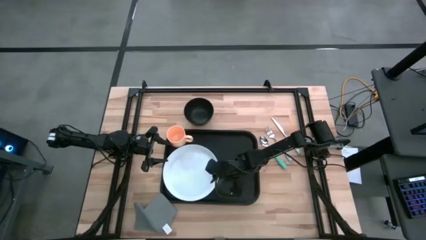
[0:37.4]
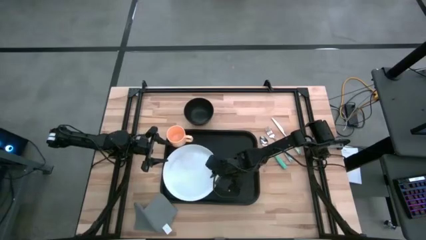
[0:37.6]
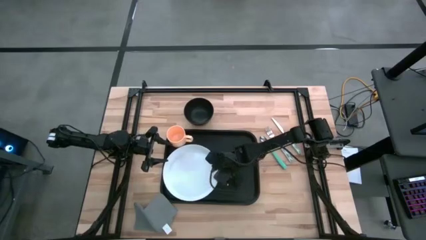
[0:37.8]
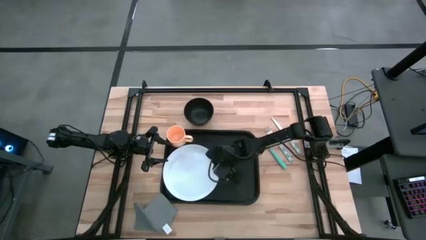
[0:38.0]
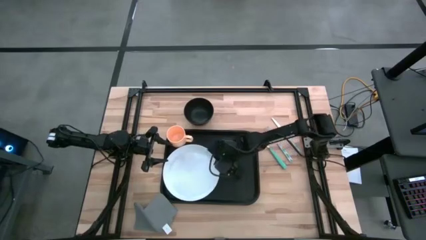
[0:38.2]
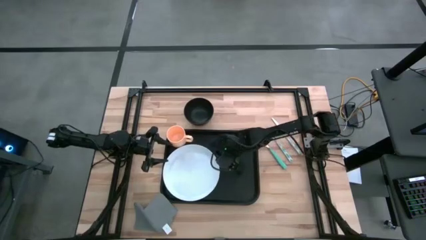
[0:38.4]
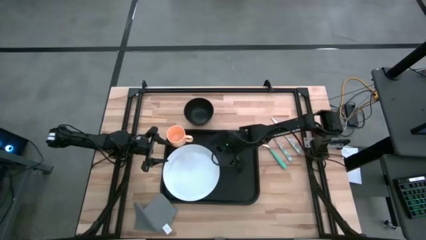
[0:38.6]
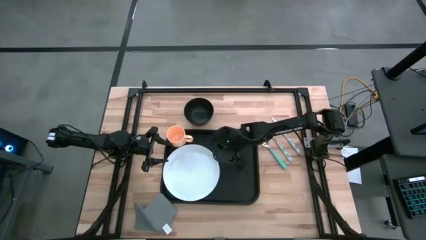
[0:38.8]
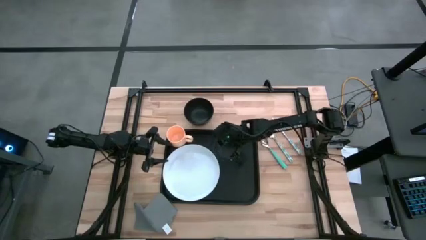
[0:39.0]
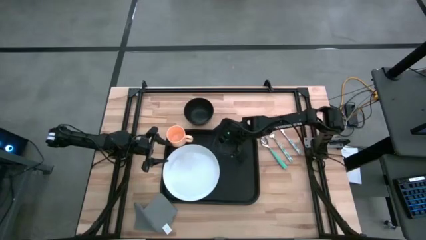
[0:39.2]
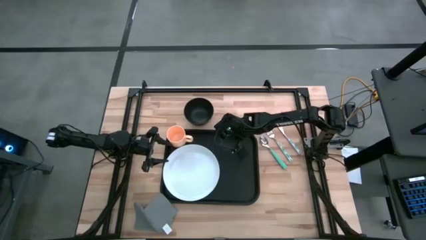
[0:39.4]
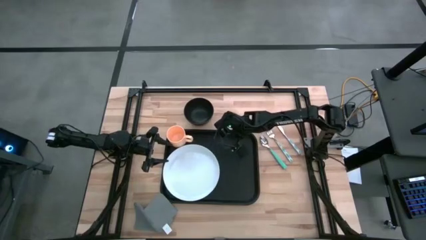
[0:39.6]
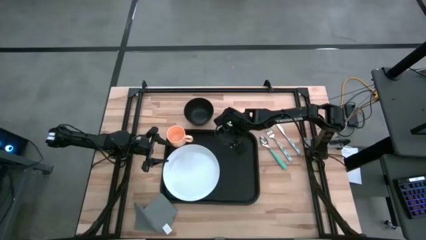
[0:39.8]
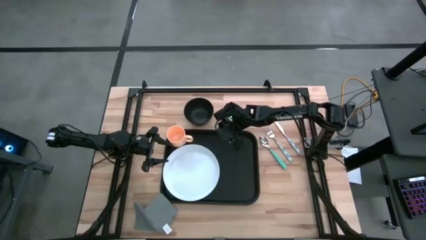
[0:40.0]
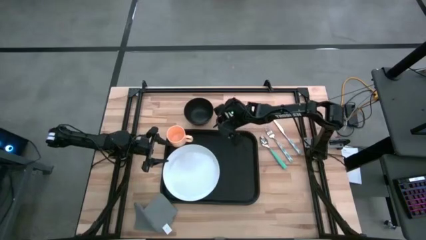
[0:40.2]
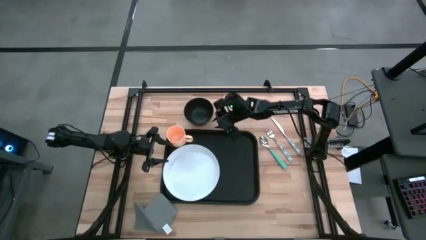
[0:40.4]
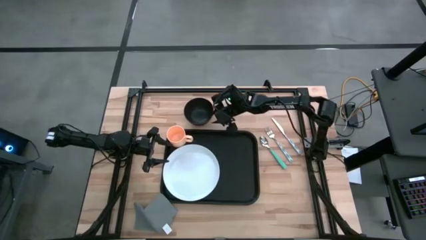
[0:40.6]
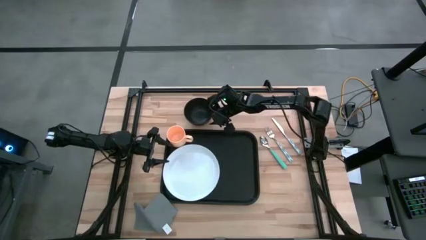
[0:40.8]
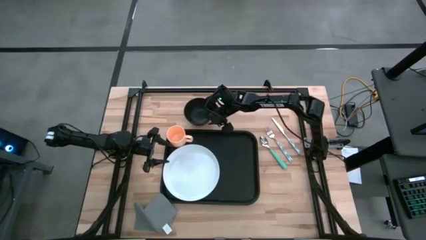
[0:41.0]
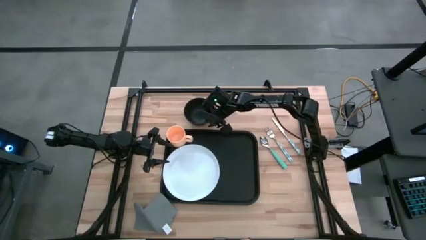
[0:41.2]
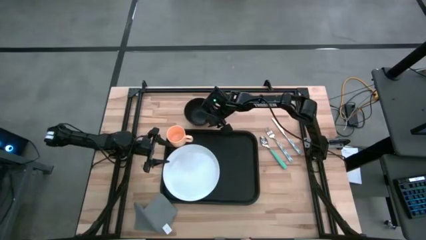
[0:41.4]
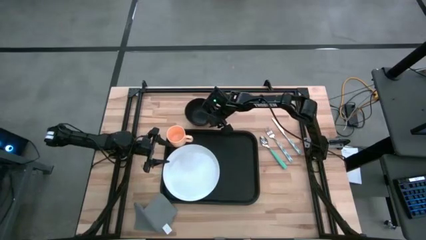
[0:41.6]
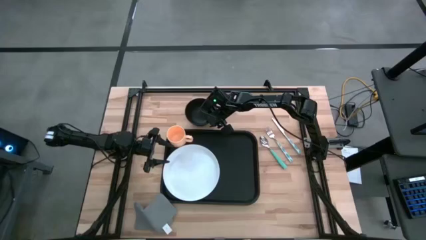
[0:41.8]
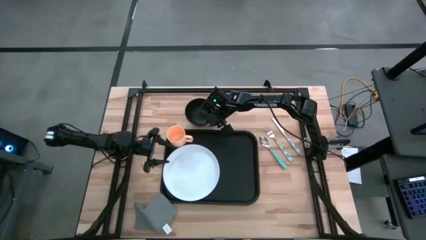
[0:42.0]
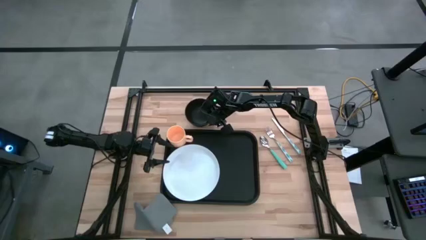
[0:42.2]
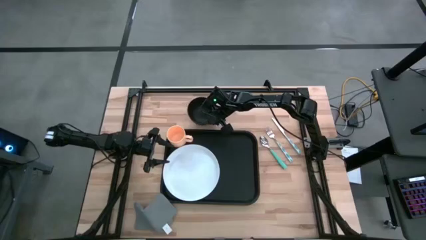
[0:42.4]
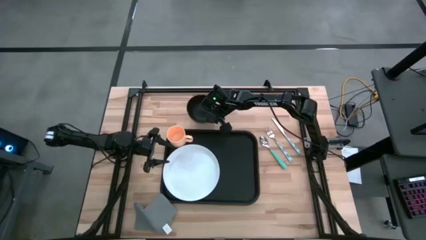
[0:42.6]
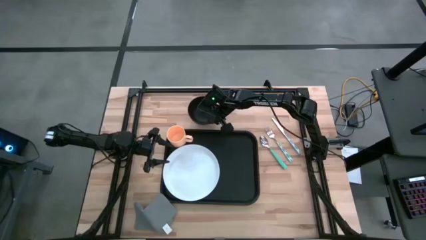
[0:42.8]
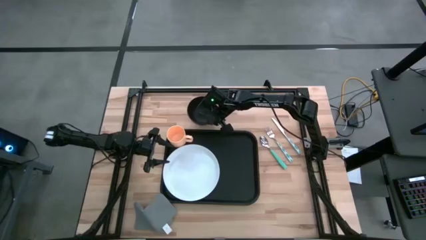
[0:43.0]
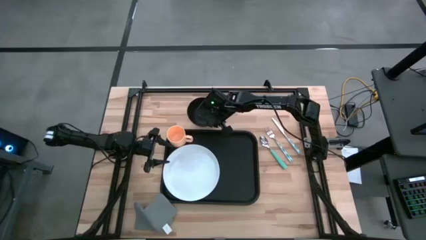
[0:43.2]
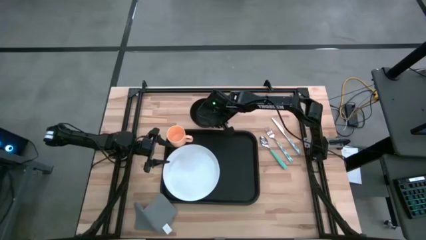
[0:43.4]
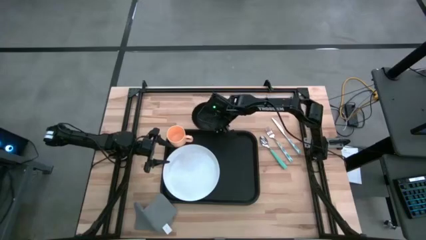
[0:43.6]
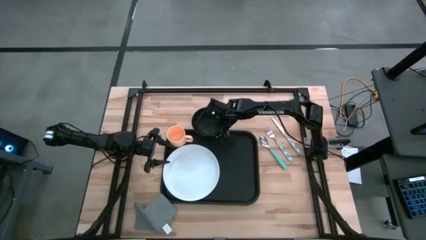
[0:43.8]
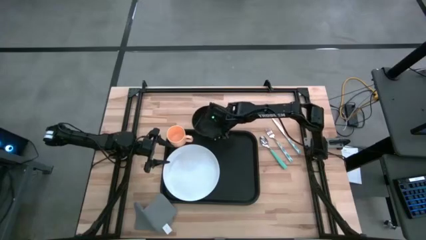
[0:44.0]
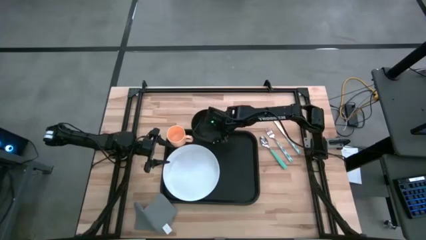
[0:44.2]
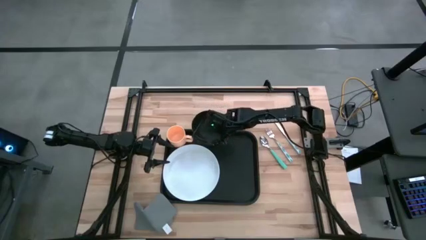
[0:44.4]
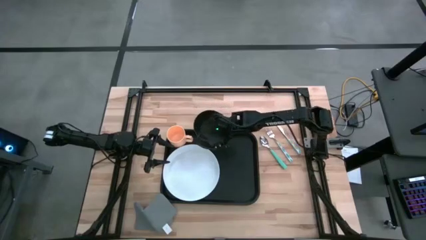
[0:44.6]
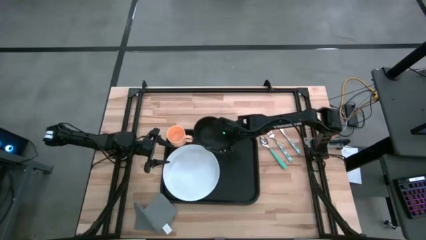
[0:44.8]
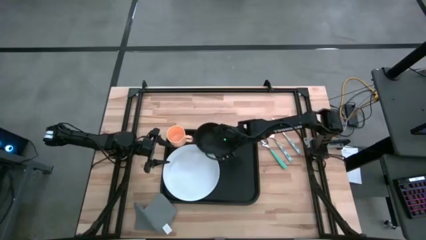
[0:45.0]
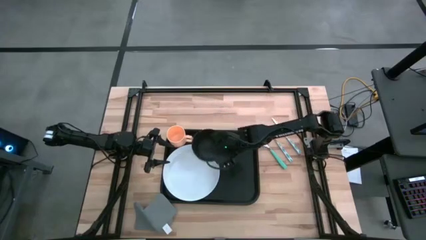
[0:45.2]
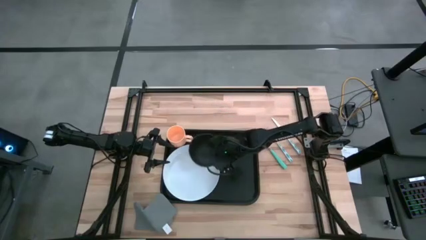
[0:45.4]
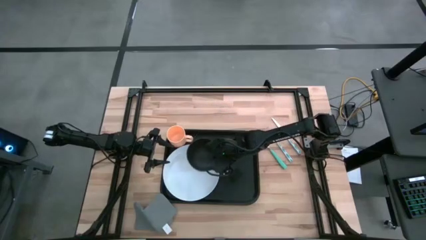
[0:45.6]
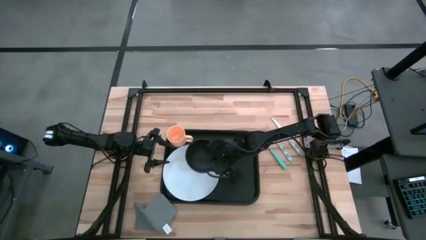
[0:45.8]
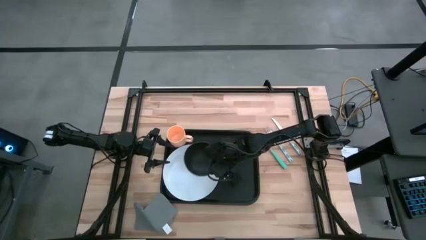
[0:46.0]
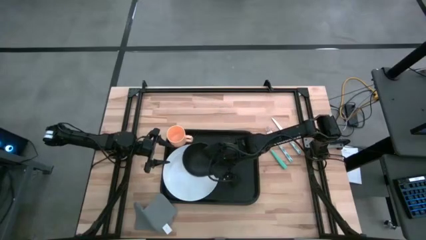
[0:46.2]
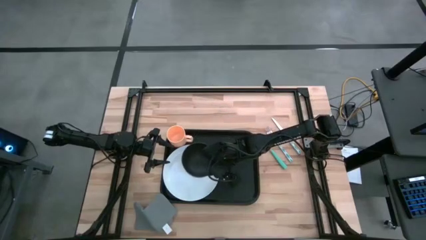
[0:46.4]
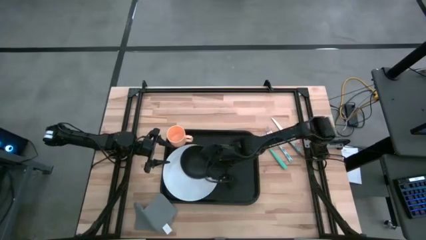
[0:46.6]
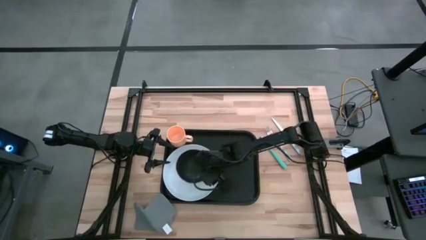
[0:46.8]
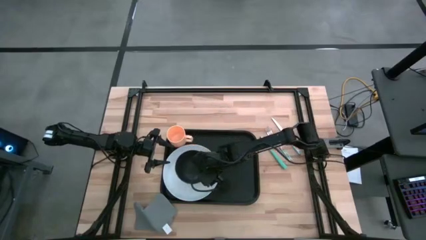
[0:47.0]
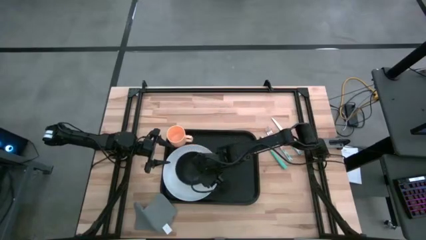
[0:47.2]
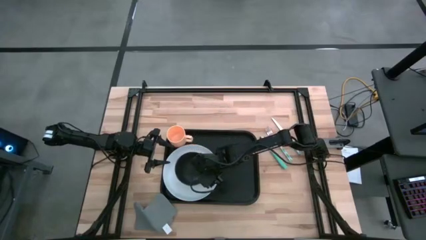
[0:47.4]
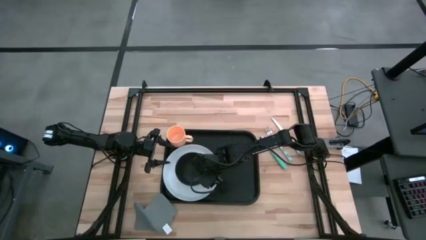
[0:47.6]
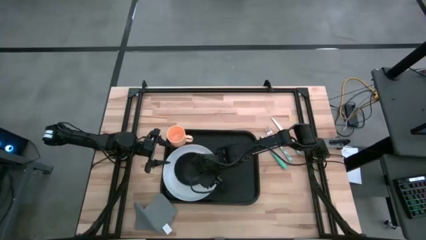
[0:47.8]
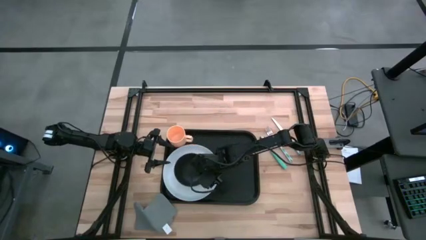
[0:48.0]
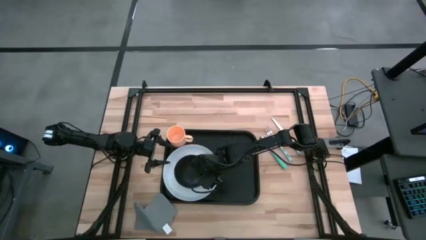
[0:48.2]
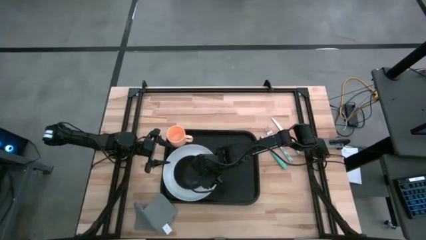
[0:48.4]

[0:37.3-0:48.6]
Task: Set up tray
Put the black bowl on top of the white plate
